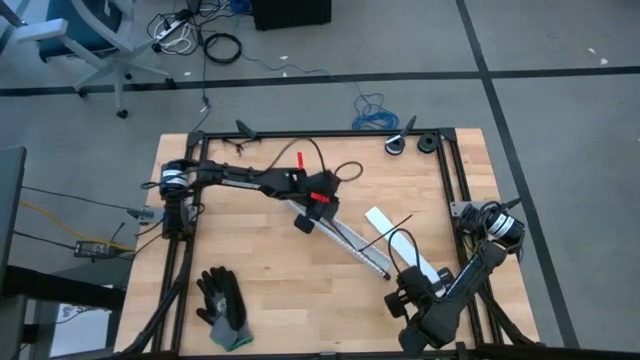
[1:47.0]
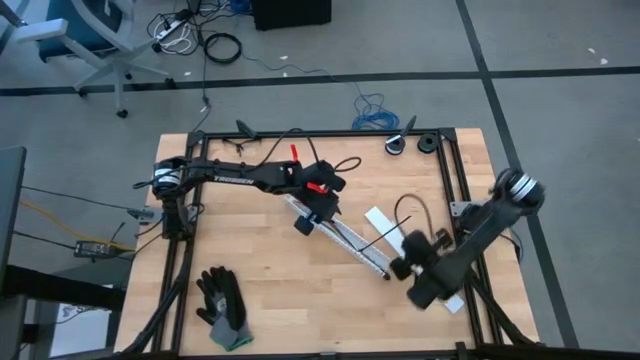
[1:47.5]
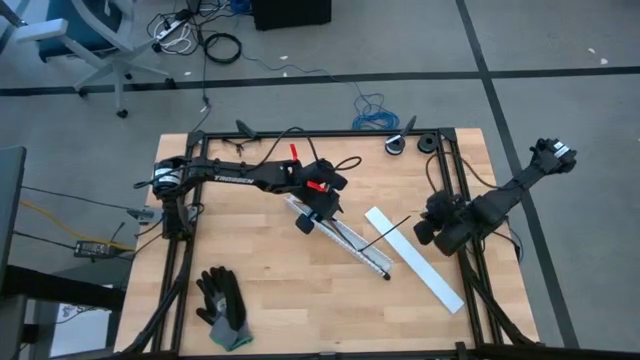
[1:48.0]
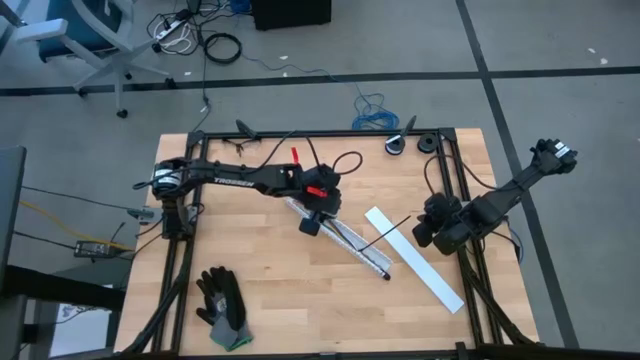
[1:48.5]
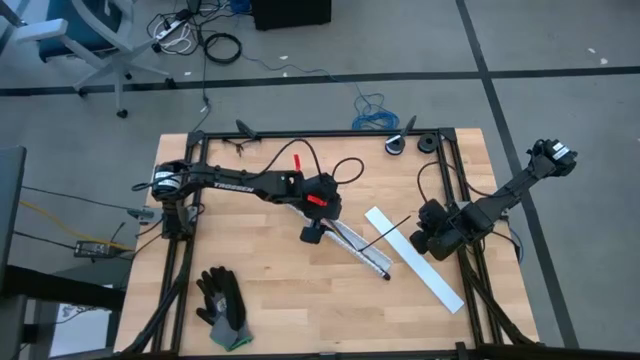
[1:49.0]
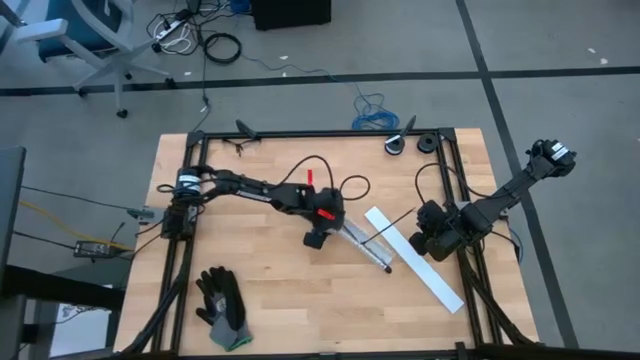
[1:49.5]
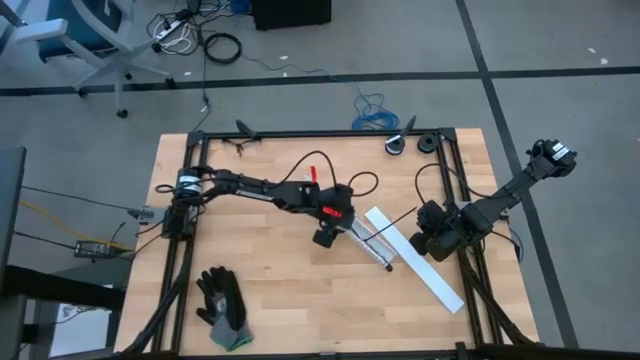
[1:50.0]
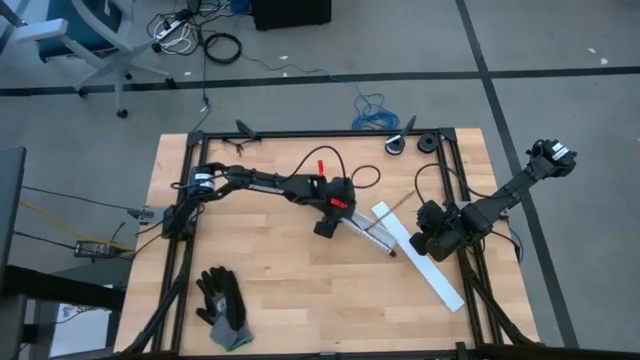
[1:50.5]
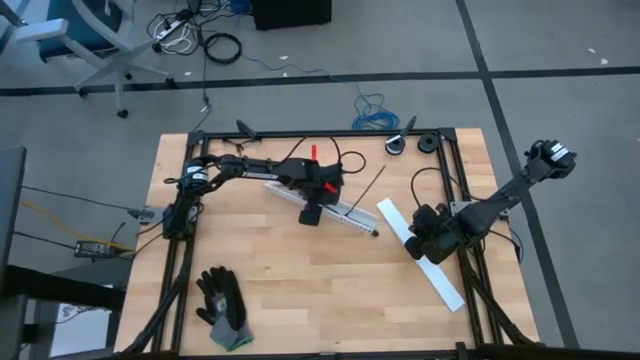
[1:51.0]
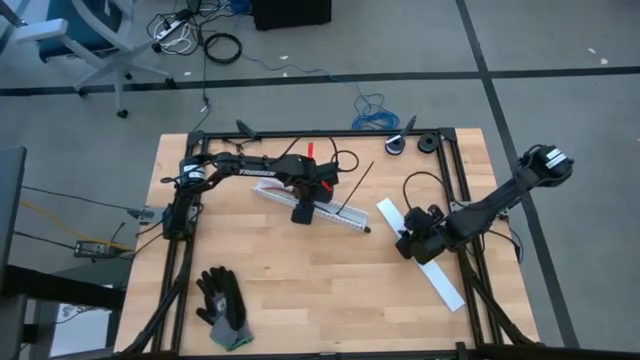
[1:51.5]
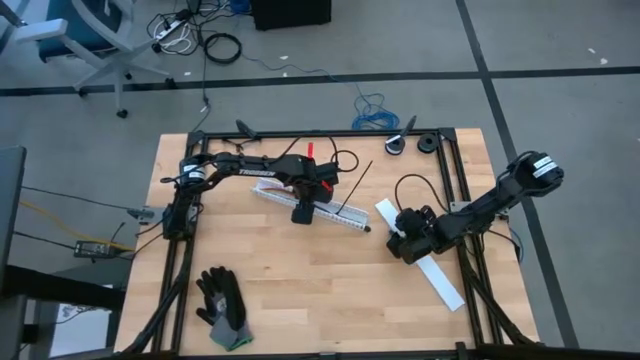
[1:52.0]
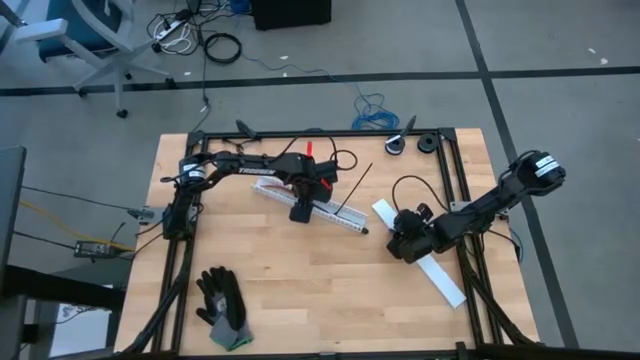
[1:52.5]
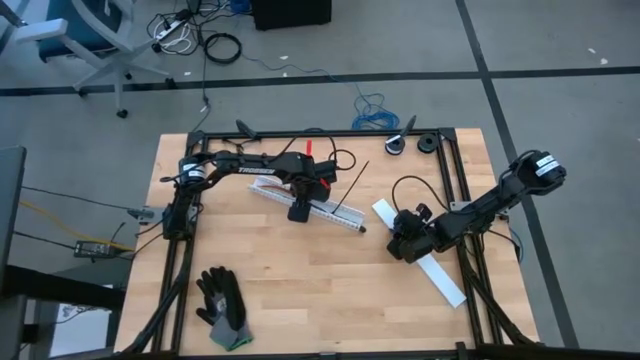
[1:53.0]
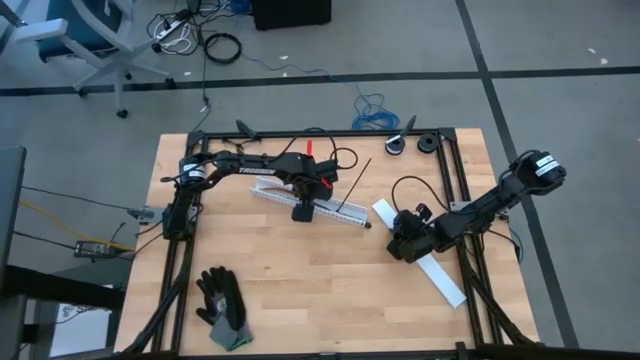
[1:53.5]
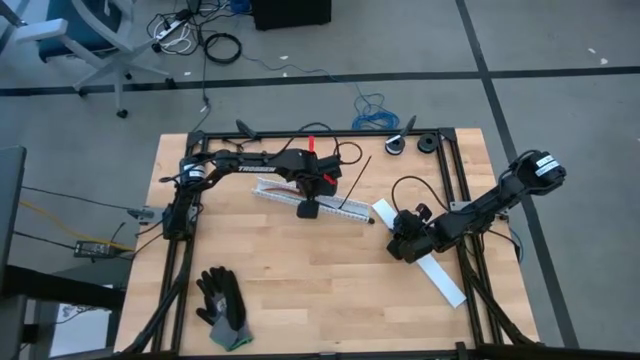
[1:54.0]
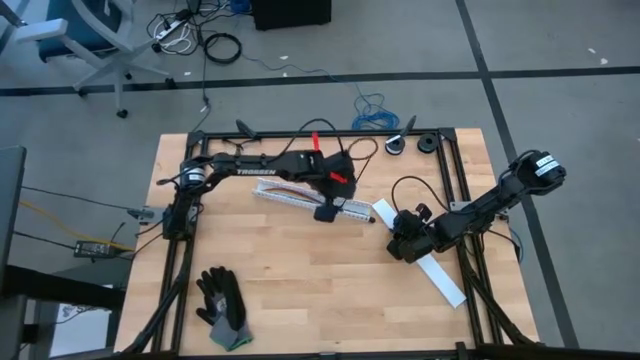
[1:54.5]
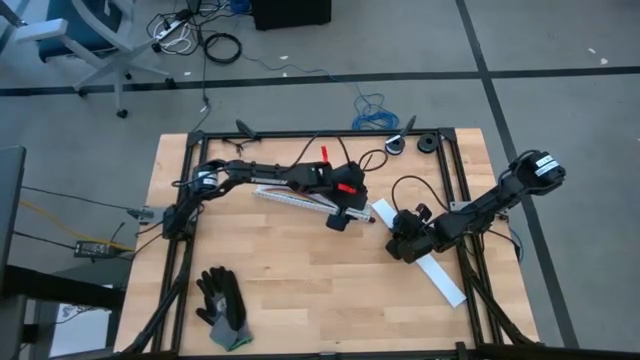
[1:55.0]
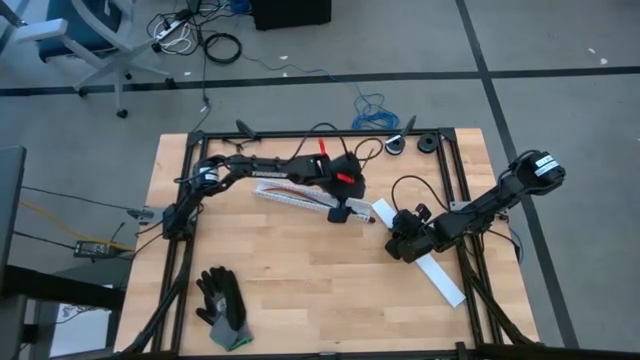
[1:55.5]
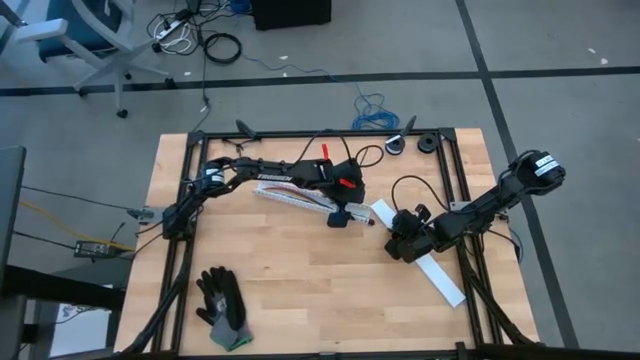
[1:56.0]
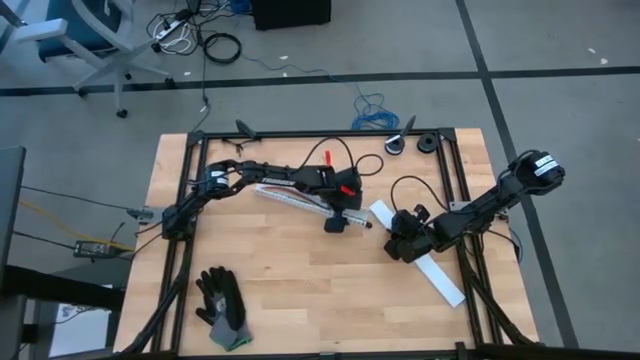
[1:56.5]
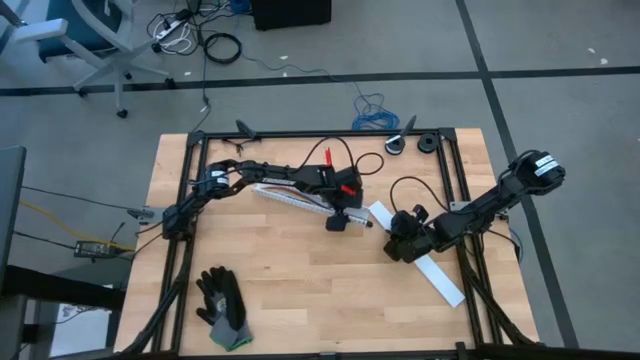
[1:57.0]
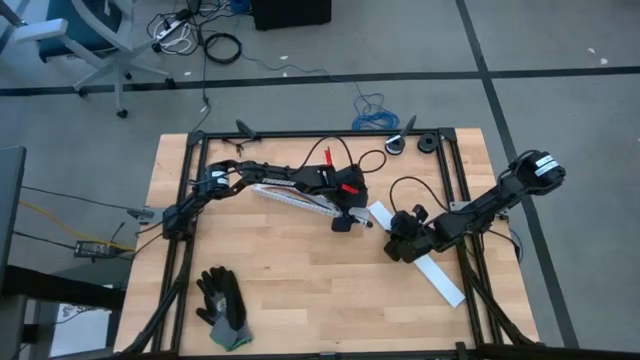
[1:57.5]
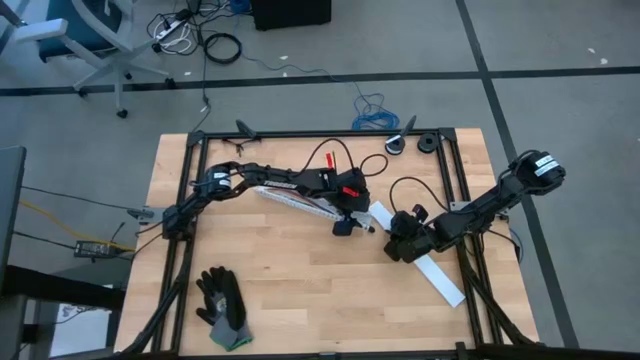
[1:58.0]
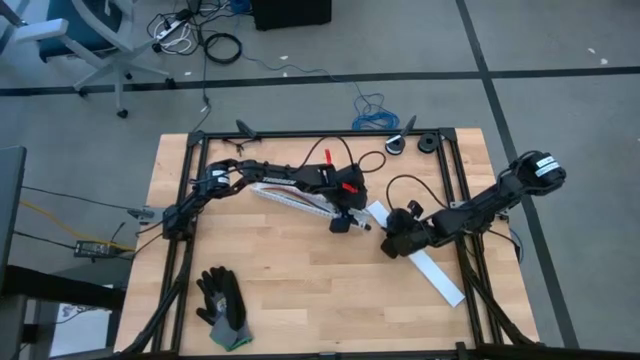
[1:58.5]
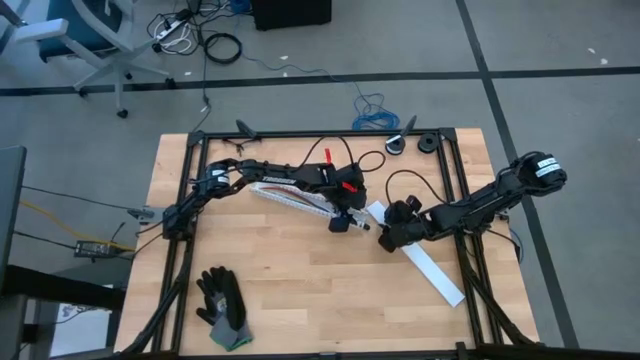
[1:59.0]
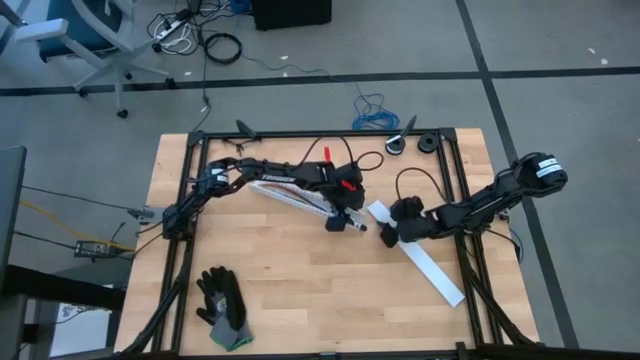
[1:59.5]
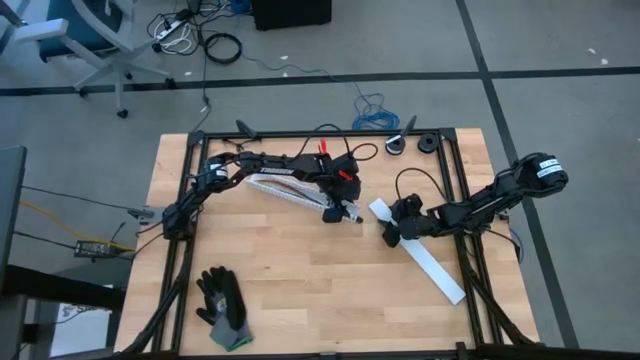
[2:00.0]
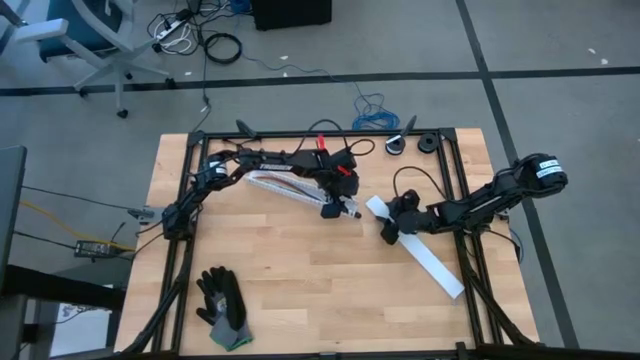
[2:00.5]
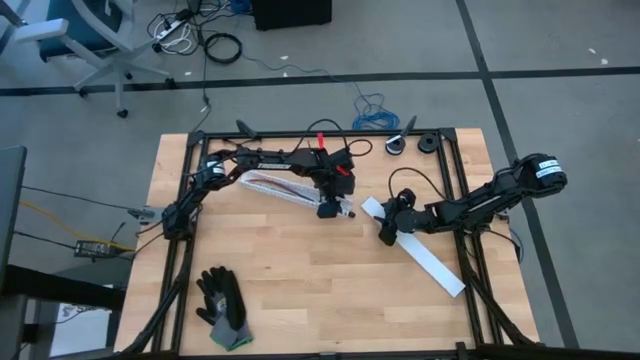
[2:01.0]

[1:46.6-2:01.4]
Task: Ziptie cables
Close the white cable duct with the cover

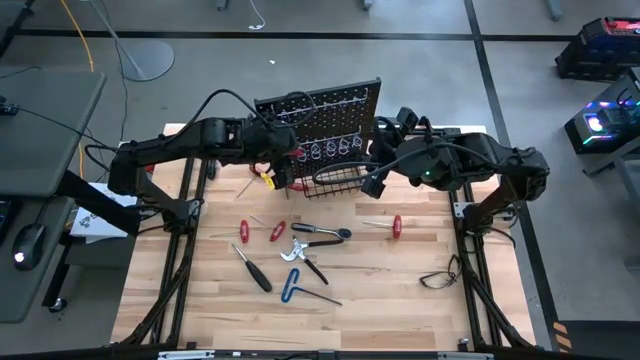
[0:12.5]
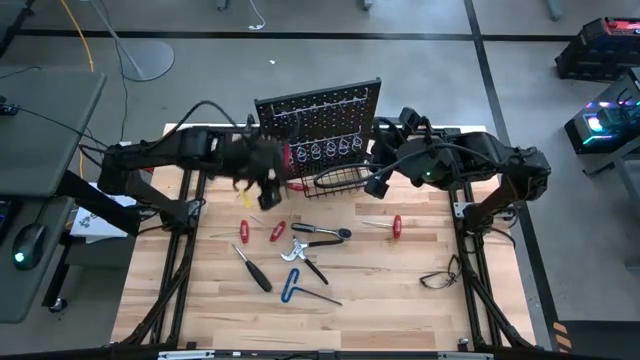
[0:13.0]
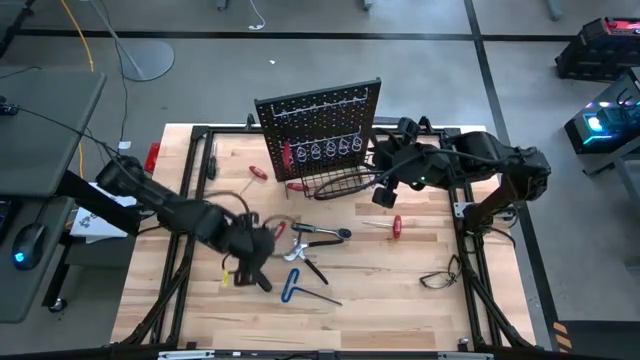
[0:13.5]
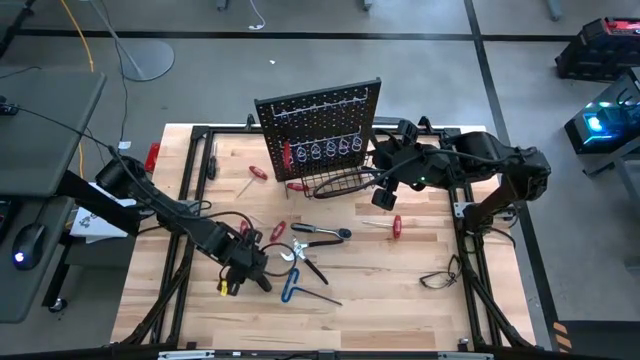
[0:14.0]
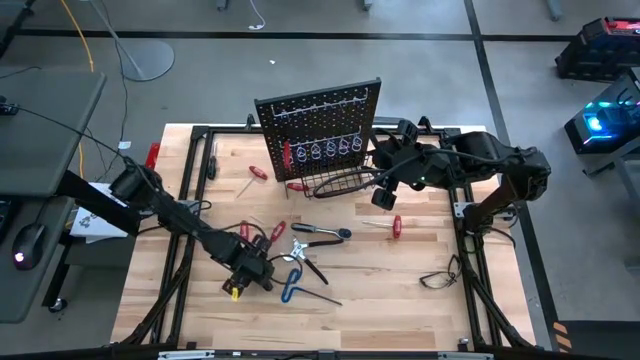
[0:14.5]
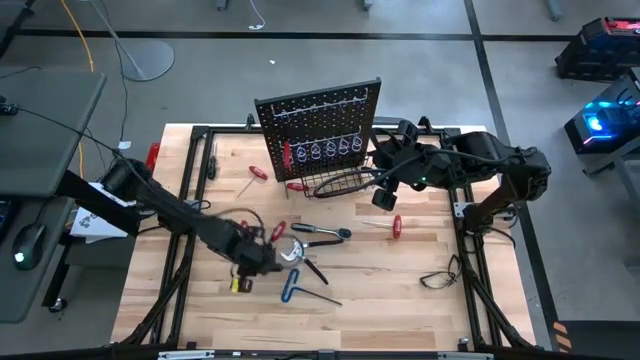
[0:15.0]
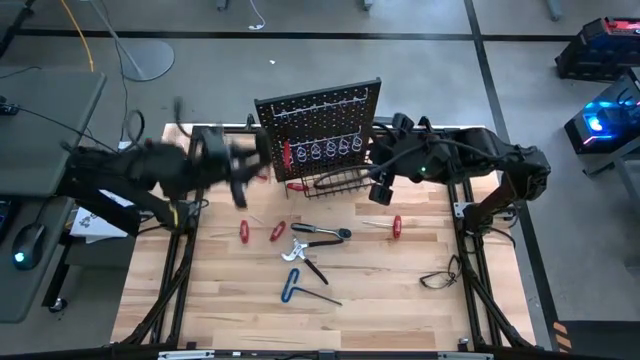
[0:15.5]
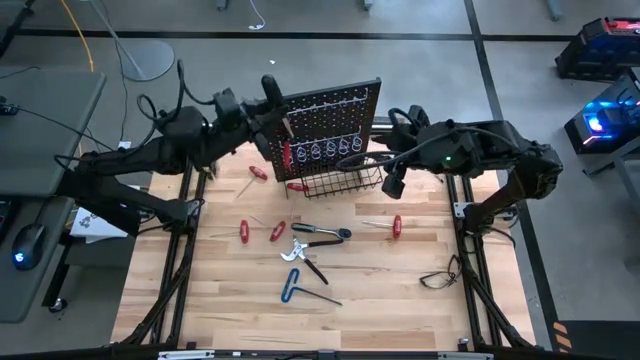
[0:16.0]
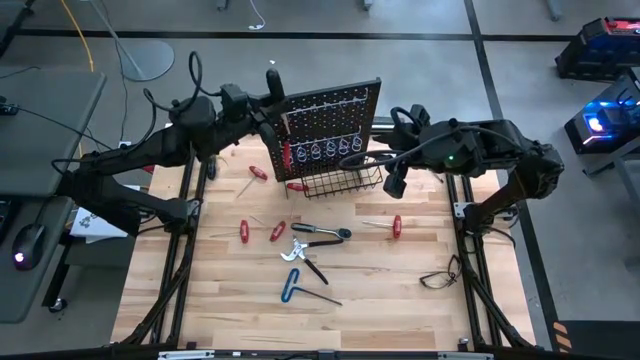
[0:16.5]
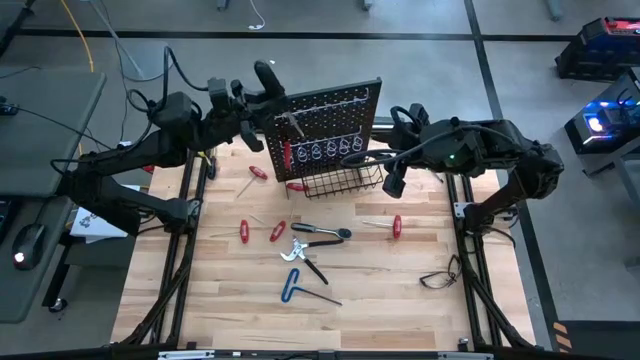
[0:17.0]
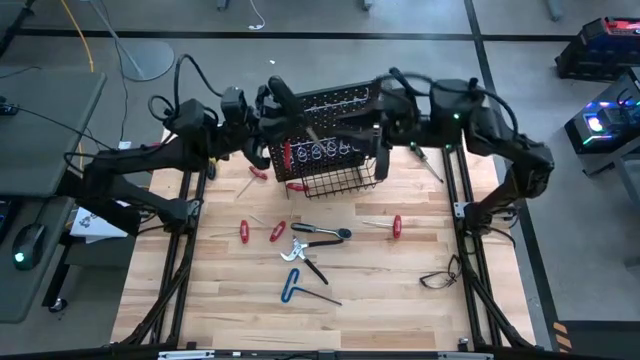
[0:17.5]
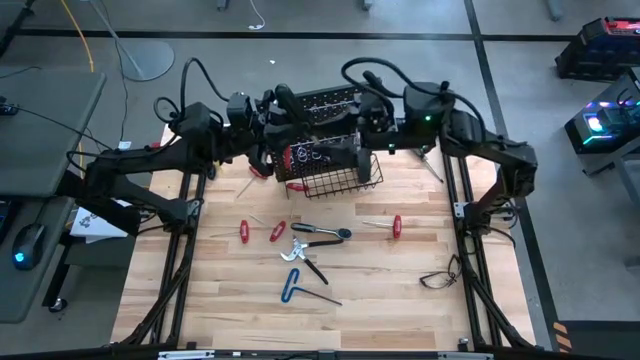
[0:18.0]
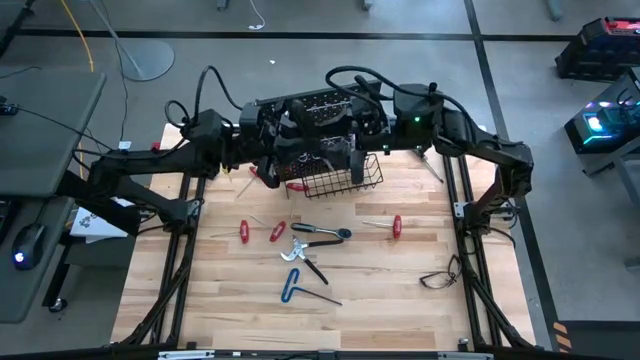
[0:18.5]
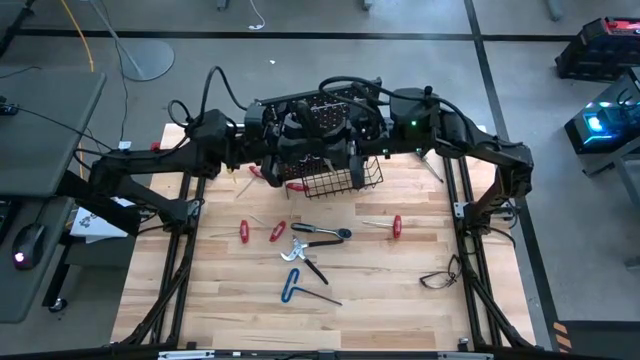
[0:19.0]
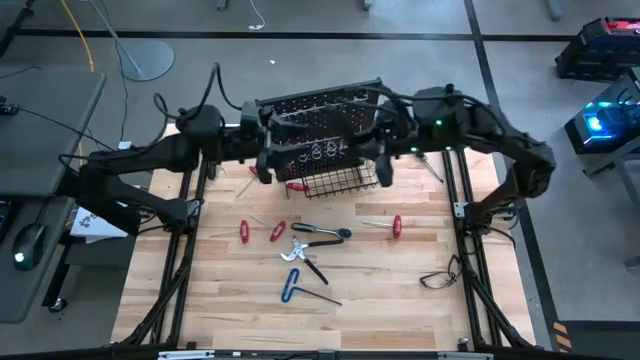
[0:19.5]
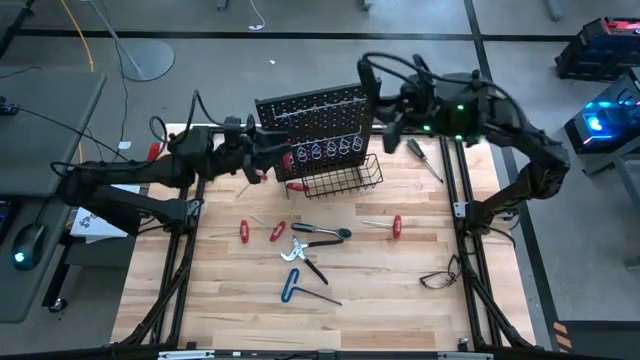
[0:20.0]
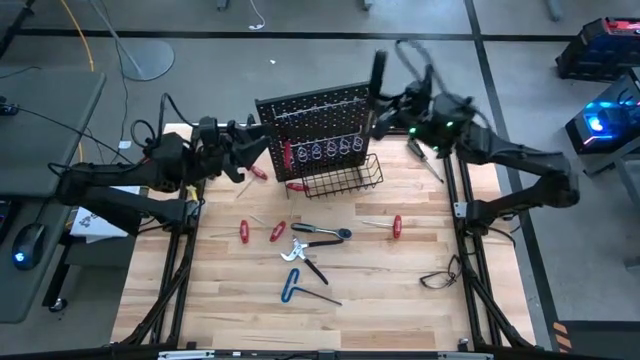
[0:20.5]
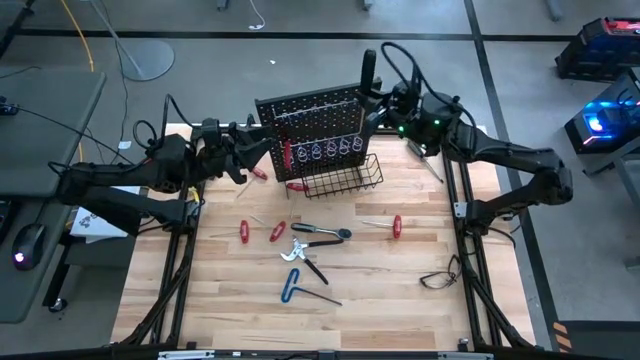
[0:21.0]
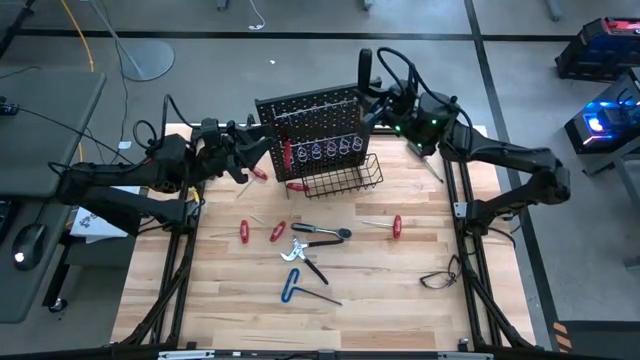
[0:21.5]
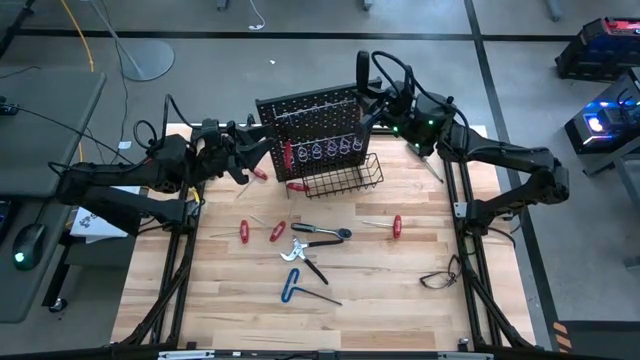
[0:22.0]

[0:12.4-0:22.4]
Task: Hang tools onto peg board
Hang the black nut driver on the peg board
